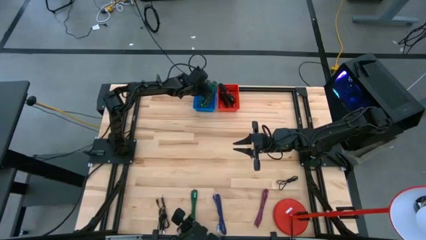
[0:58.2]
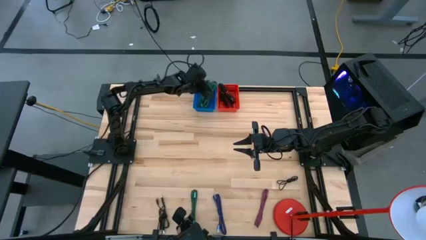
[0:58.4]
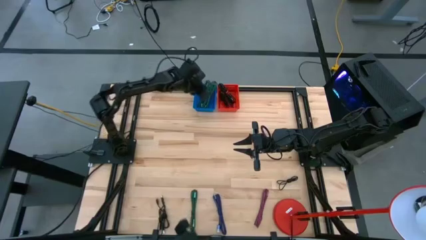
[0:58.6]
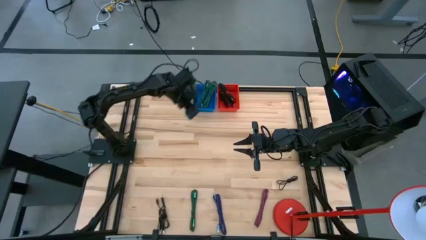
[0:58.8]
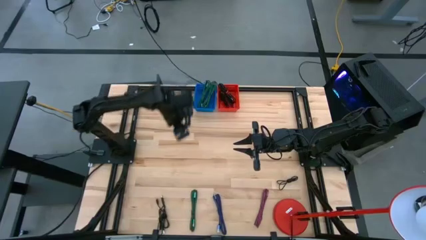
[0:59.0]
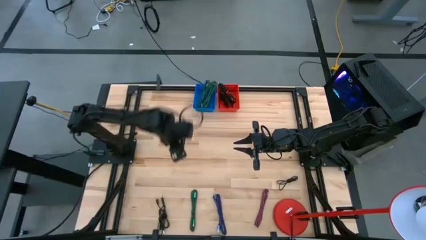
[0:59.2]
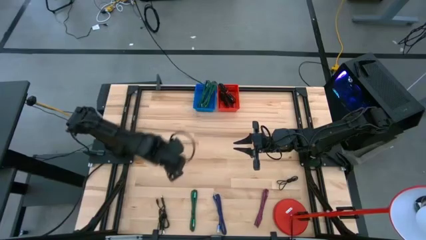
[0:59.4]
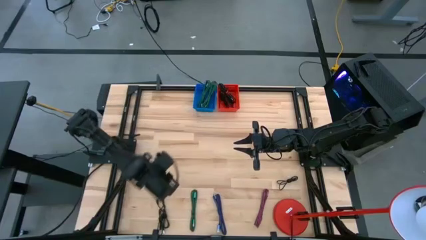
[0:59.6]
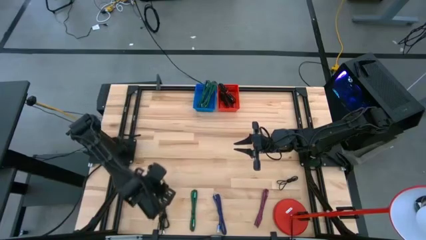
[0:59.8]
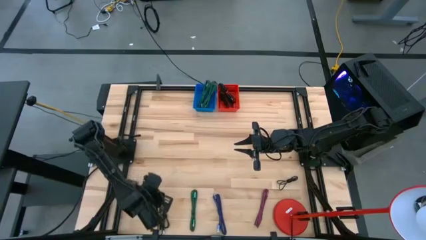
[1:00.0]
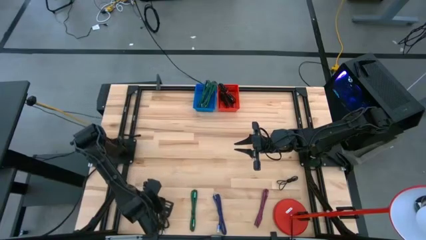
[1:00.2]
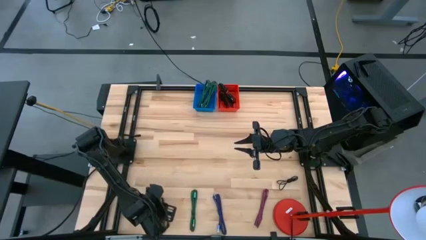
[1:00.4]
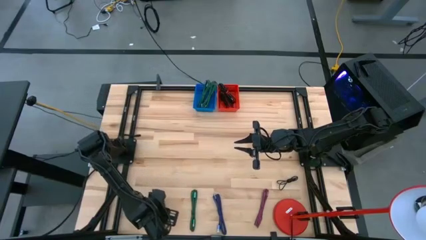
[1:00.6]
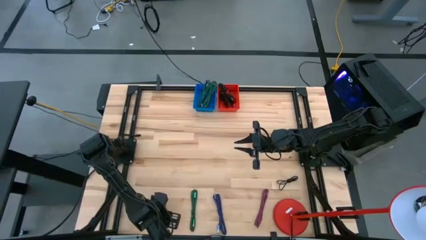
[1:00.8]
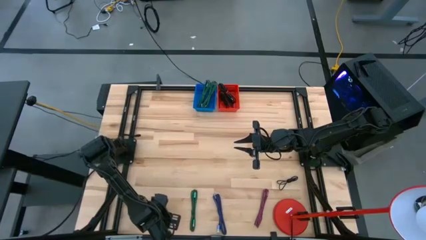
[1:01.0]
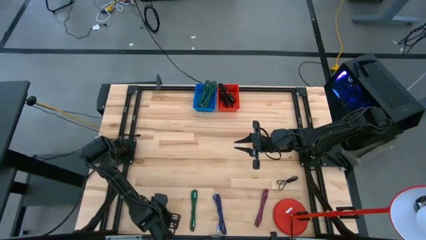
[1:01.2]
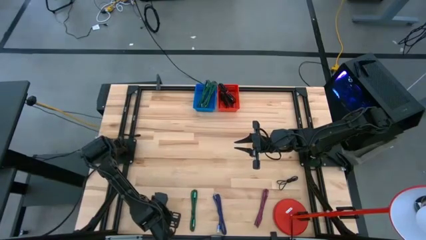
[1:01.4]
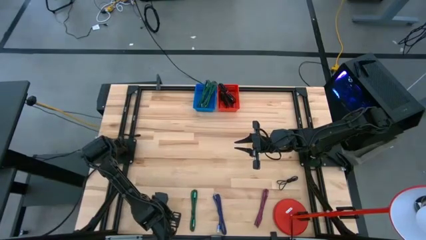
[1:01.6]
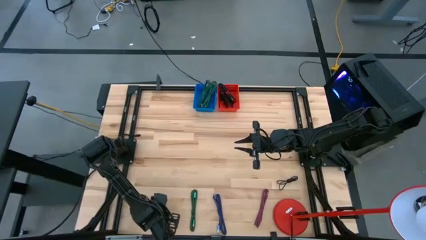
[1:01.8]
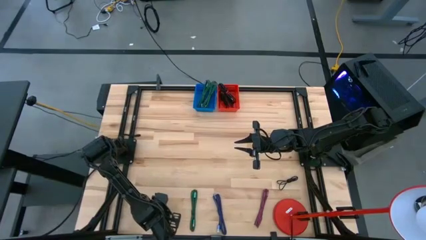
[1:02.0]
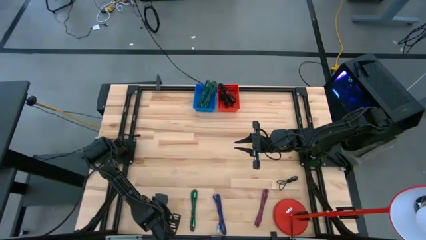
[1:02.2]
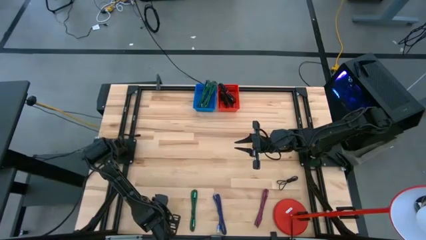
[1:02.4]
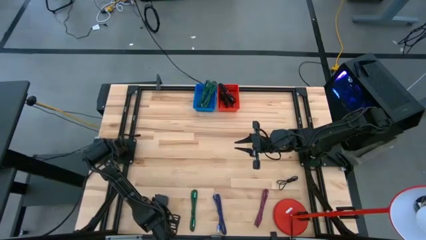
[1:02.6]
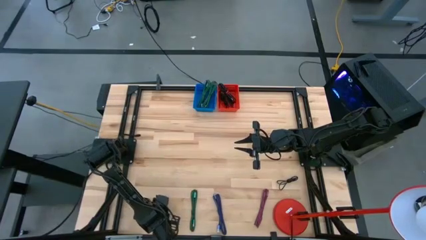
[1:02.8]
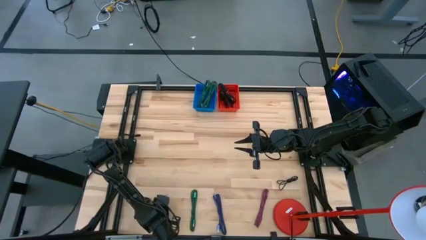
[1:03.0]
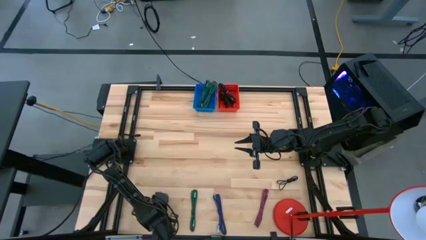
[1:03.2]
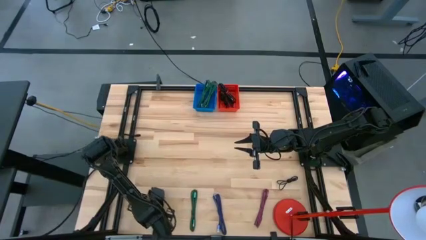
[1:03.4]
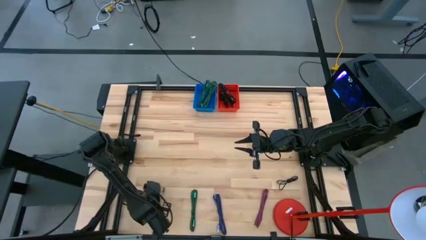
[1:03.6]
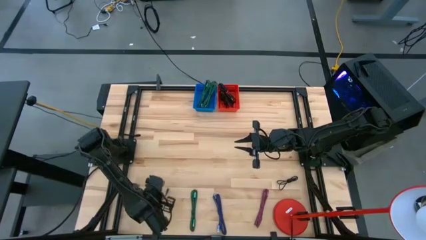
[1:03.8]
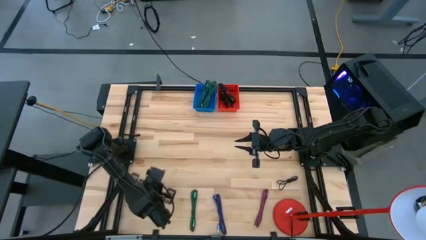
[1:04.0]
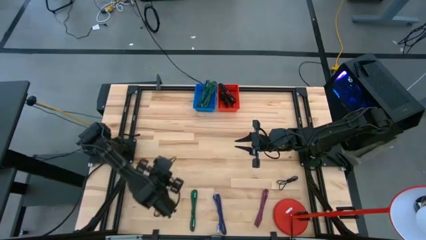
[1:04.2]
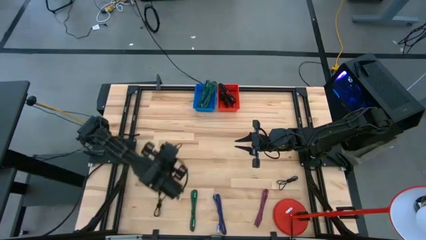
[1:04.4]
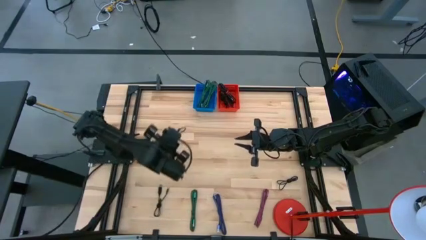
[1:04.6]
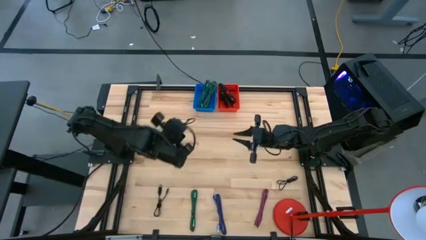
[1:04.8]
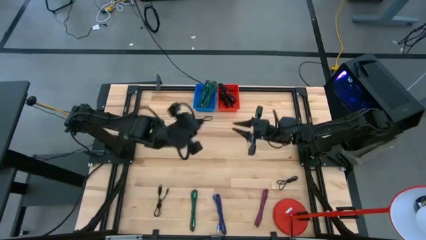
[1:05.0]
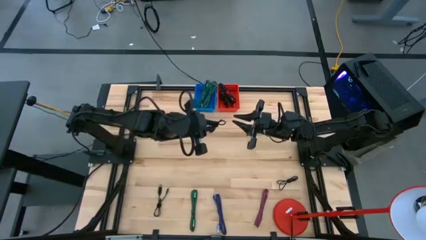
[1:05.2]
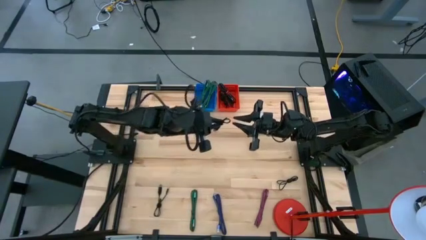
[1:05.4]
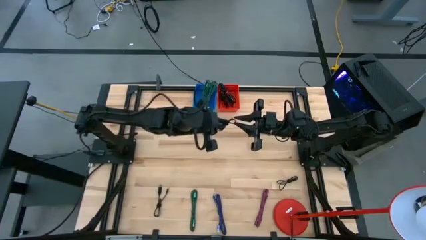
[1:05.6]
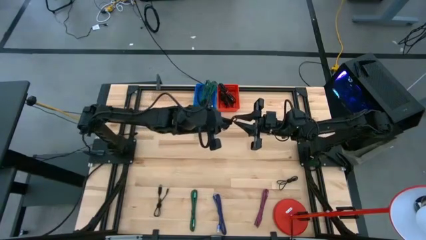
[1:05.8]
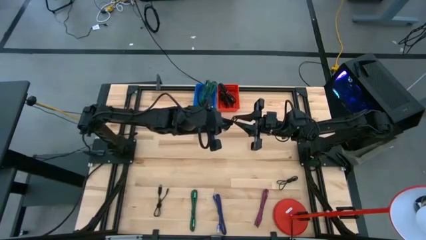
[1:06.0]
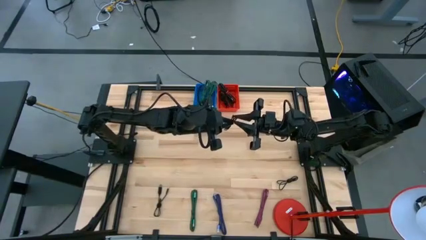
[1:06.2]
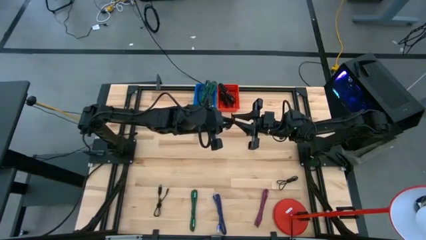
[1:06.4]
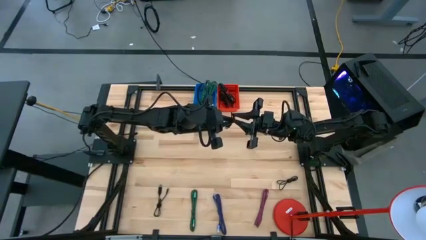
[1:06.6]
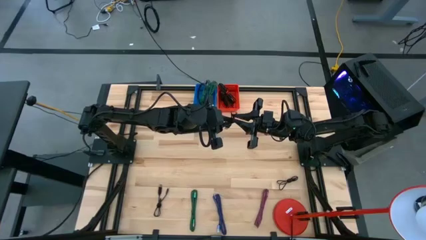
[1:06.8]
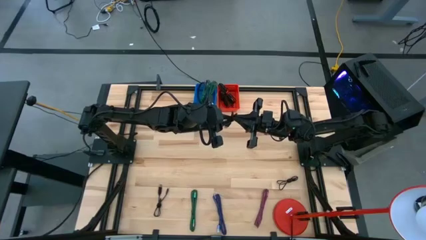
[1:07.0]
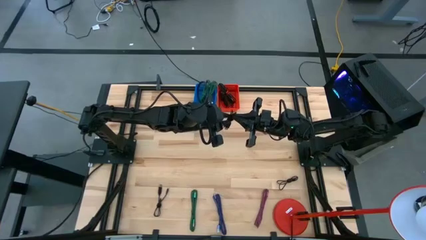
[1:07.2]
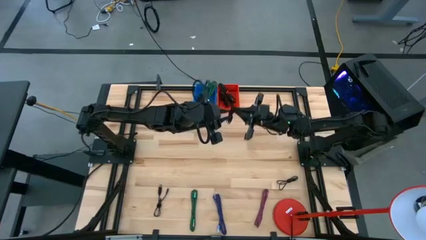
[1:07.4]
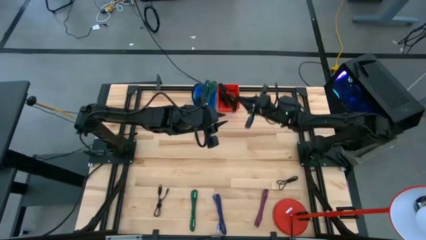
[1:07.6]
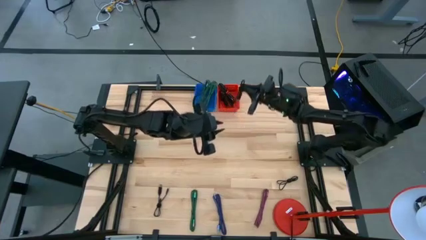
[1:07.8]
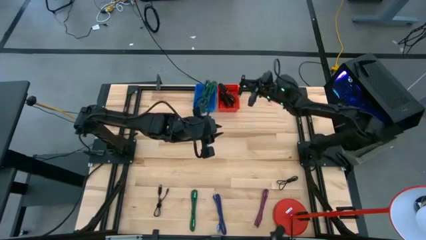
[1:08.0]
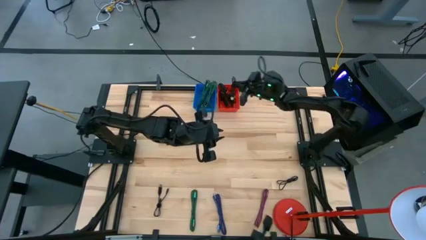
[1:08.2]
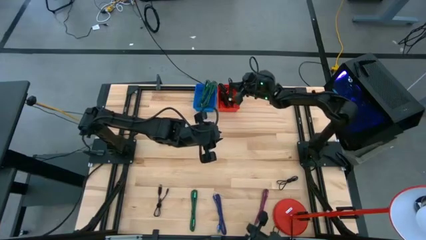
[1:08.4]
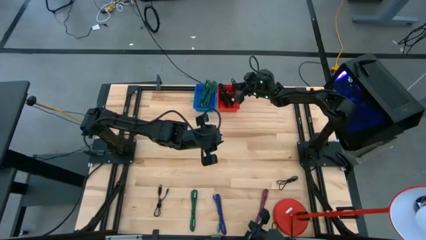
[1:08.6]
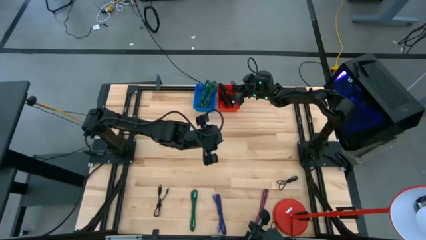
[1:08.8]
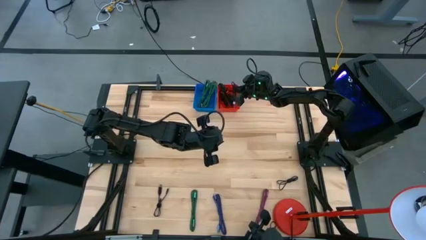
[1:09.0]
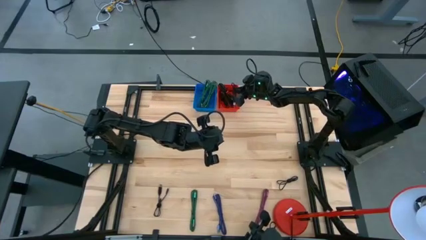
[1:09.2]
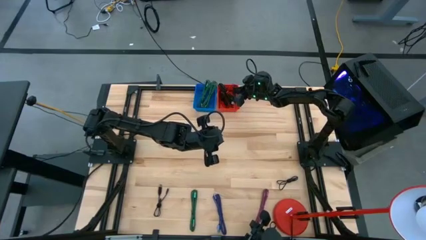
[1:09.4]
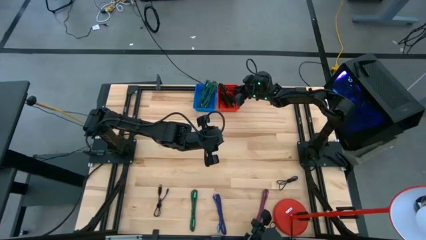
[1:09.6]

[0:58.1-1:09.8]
Task: Pick & Place USB Port
Put the black charger cable into the red bin
